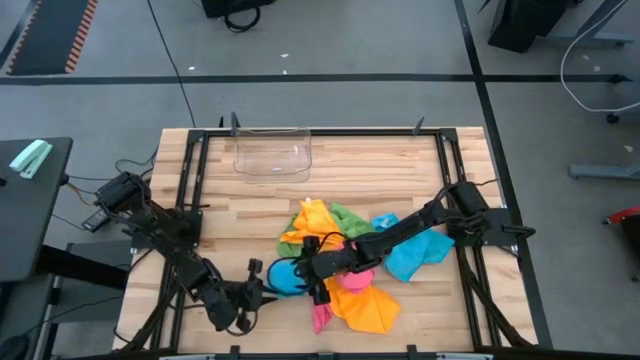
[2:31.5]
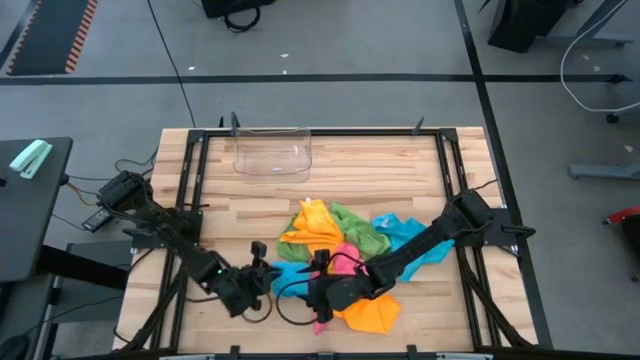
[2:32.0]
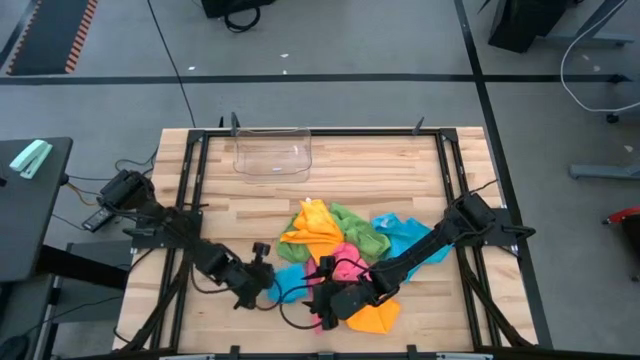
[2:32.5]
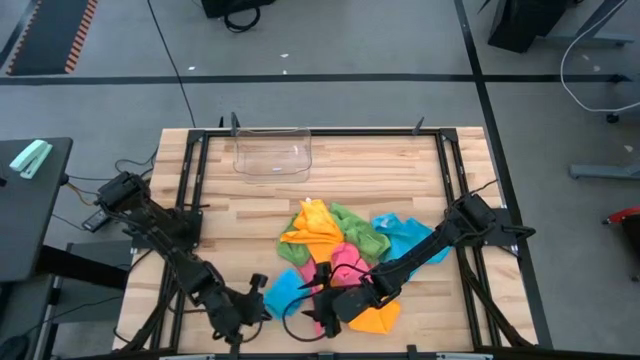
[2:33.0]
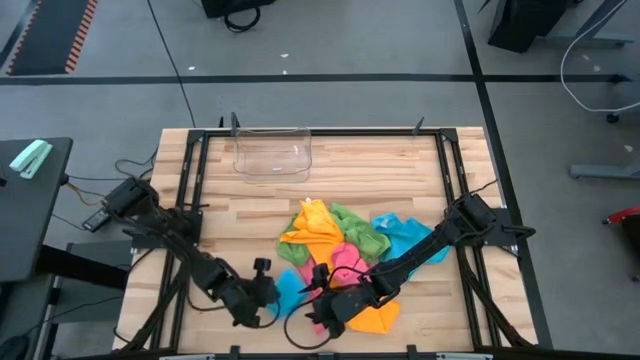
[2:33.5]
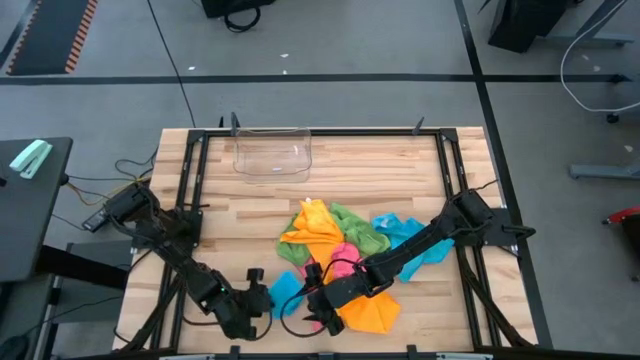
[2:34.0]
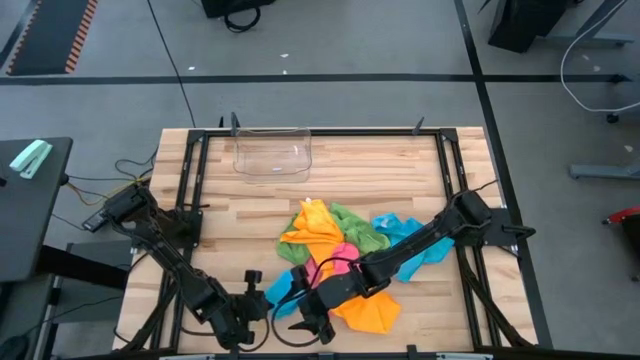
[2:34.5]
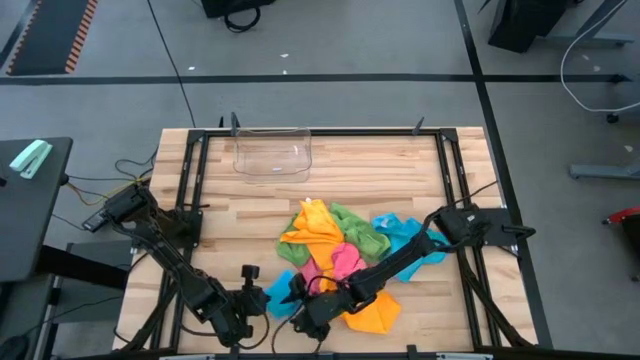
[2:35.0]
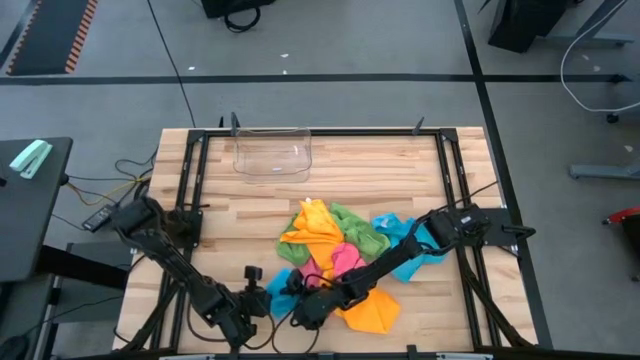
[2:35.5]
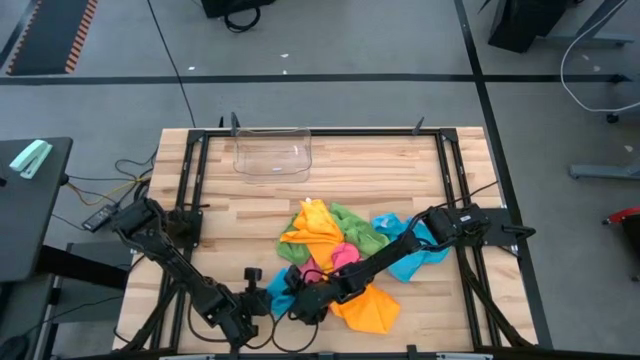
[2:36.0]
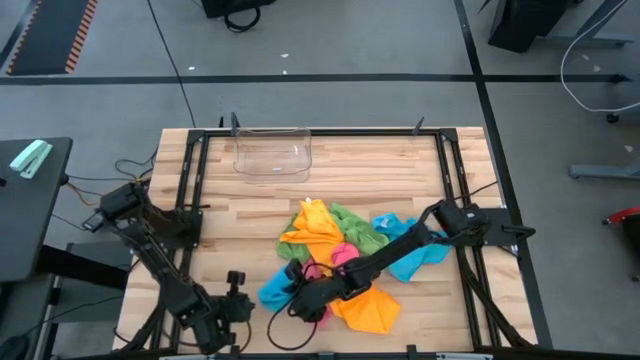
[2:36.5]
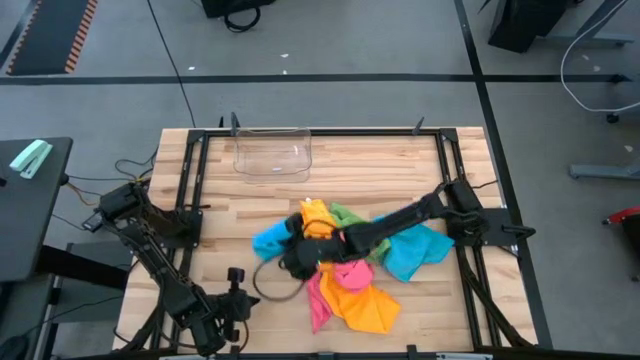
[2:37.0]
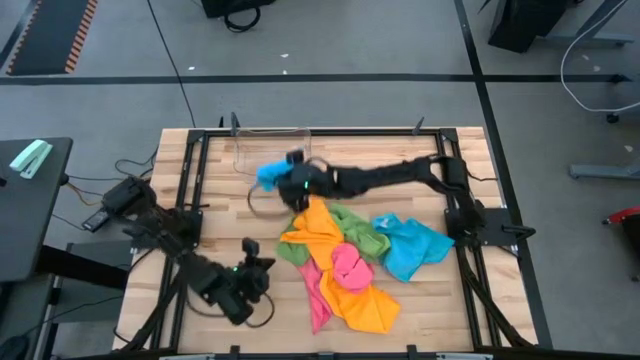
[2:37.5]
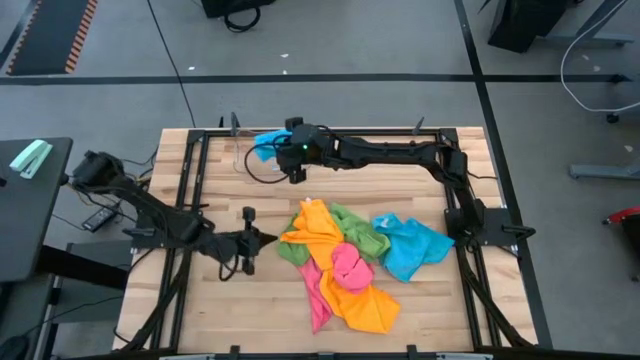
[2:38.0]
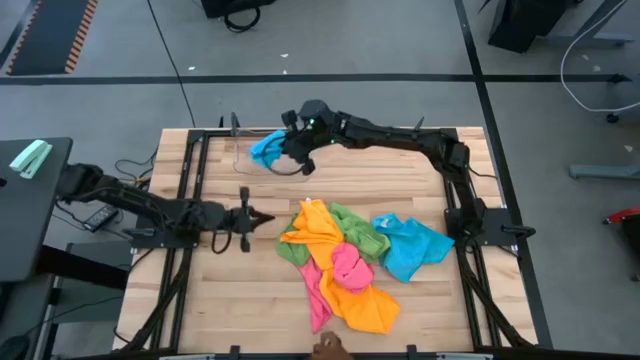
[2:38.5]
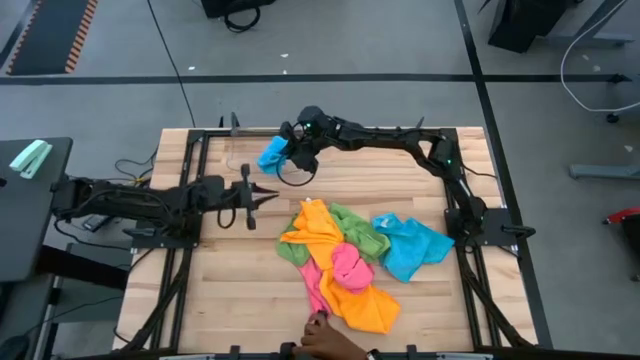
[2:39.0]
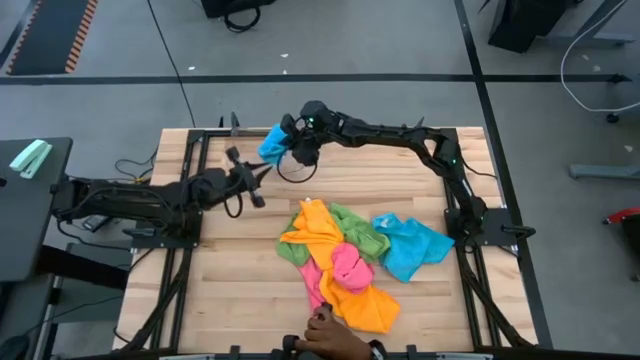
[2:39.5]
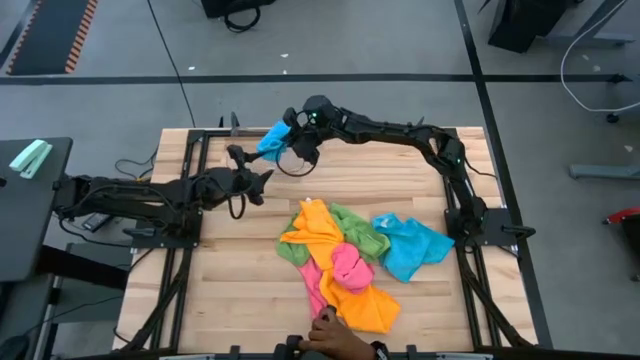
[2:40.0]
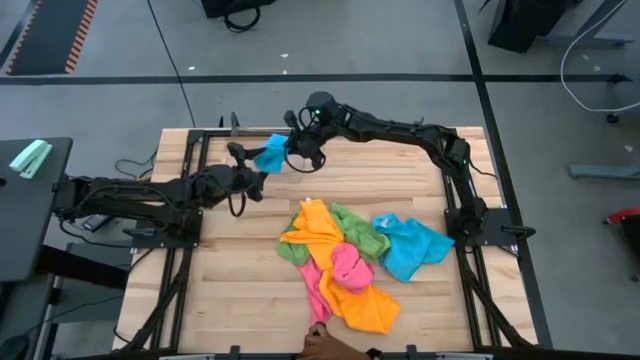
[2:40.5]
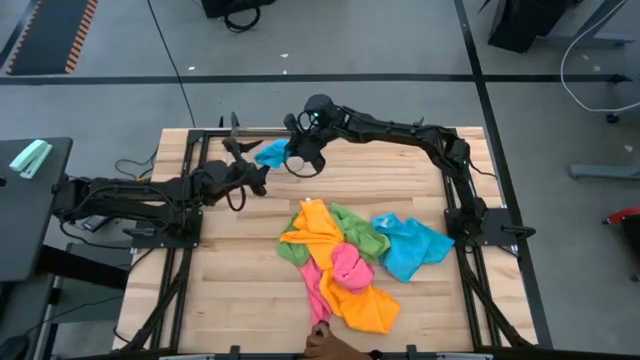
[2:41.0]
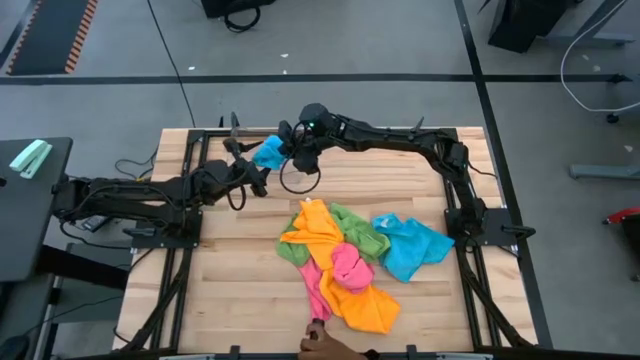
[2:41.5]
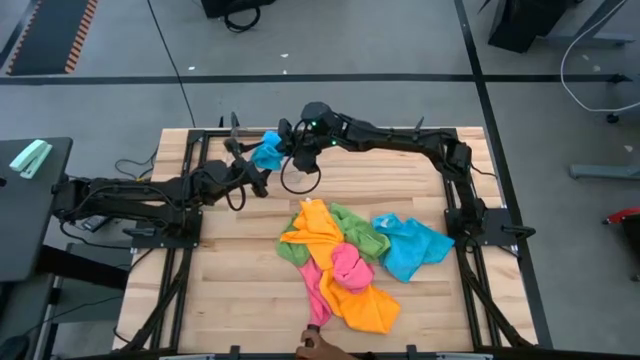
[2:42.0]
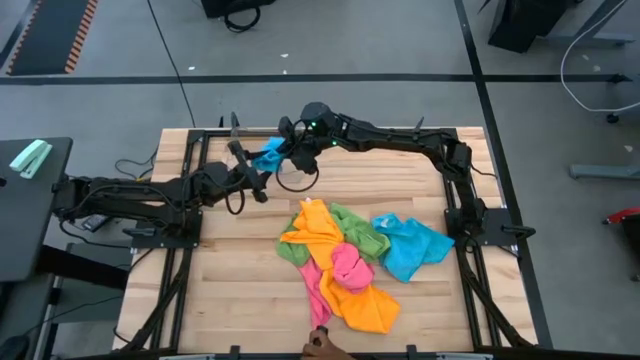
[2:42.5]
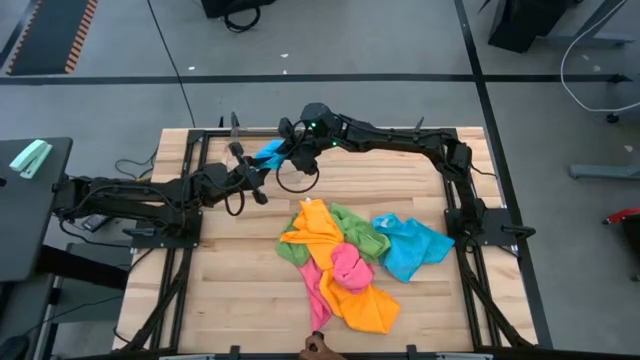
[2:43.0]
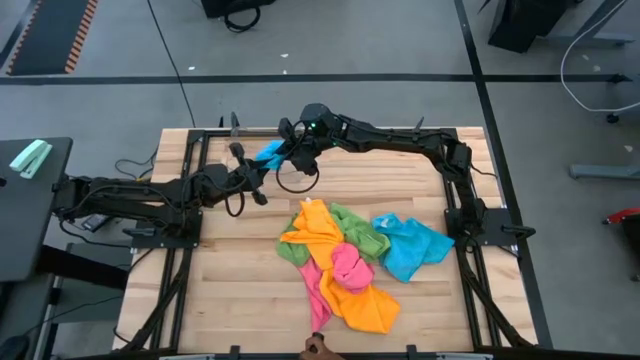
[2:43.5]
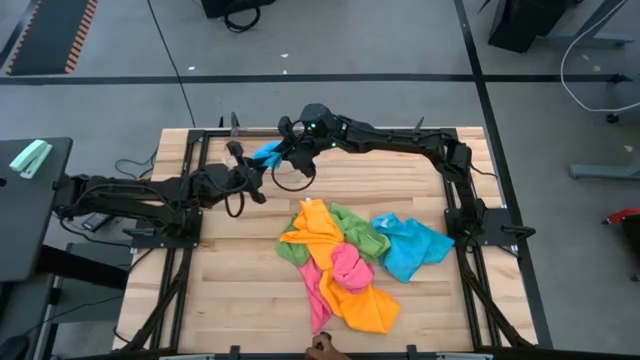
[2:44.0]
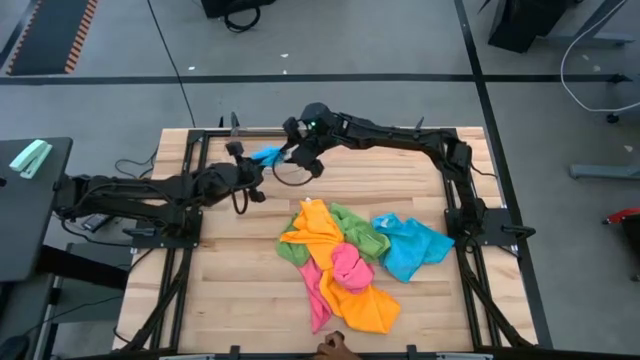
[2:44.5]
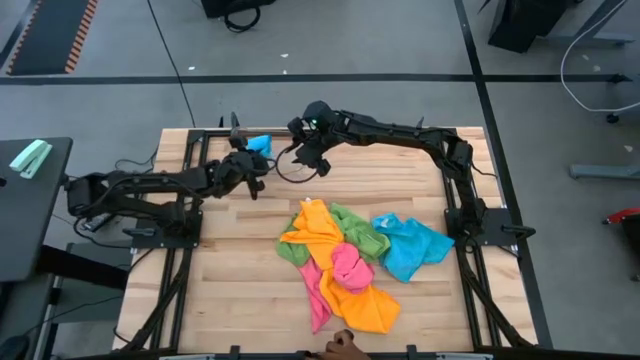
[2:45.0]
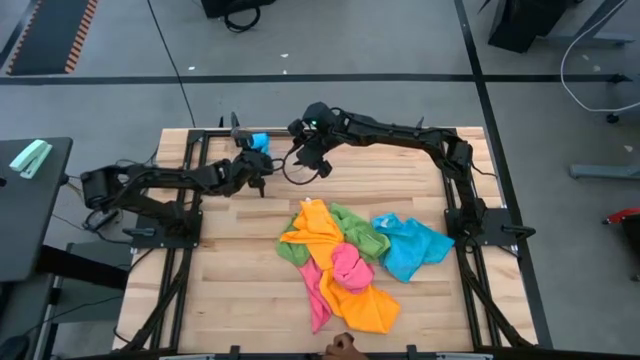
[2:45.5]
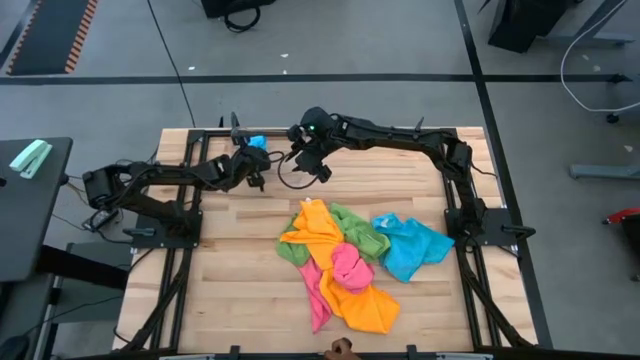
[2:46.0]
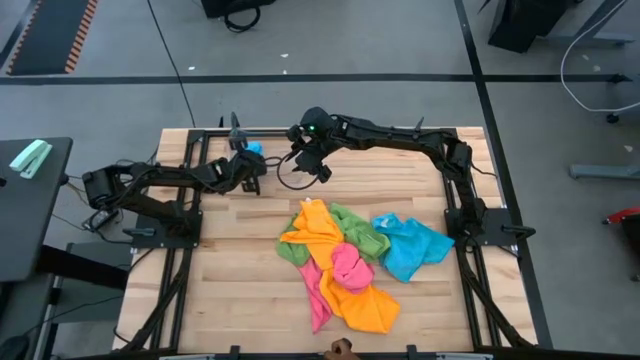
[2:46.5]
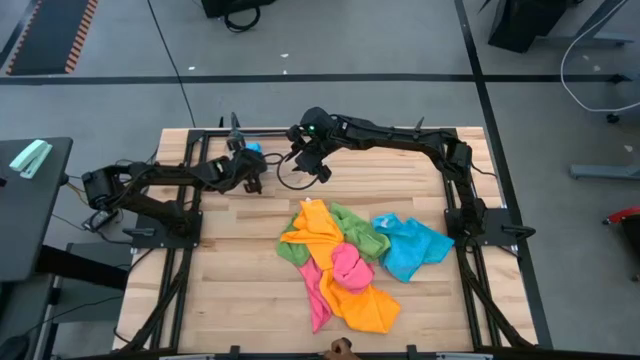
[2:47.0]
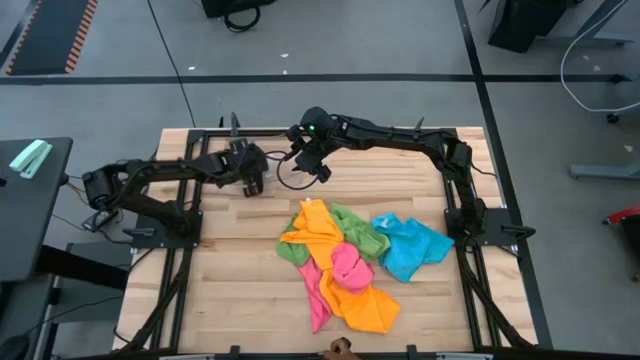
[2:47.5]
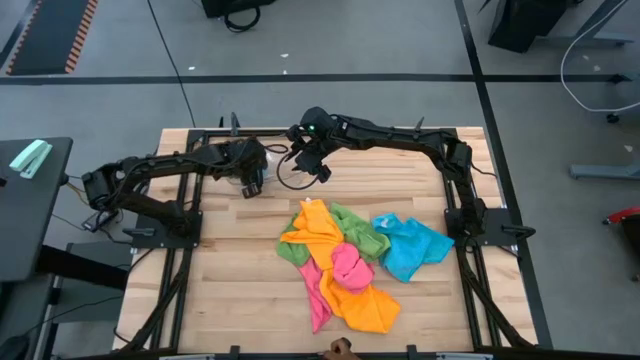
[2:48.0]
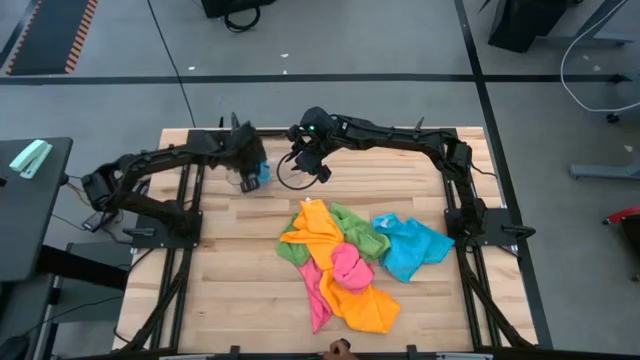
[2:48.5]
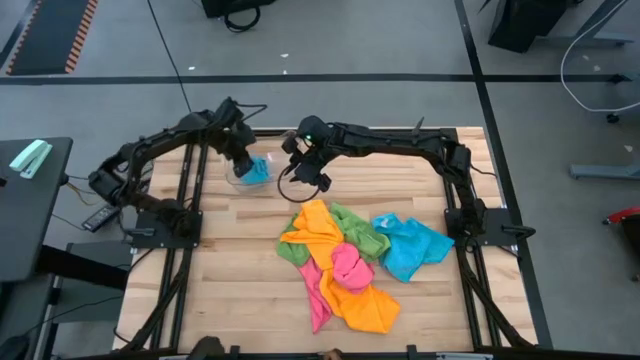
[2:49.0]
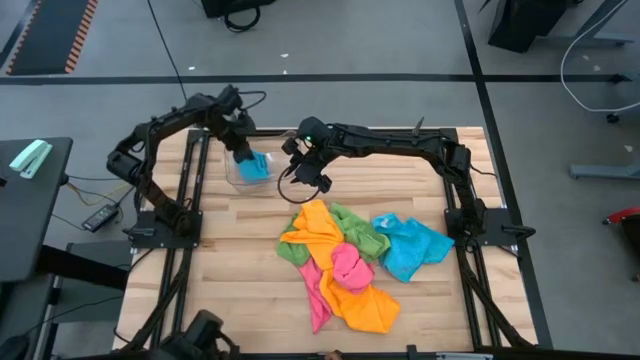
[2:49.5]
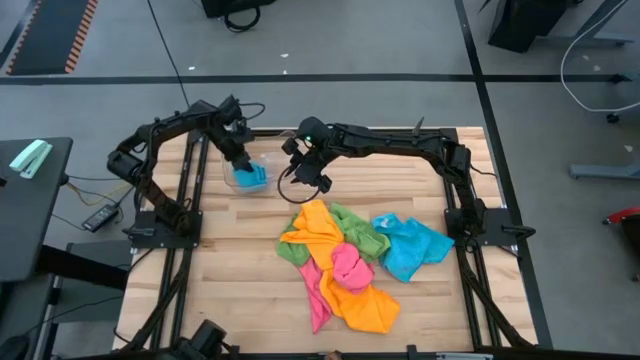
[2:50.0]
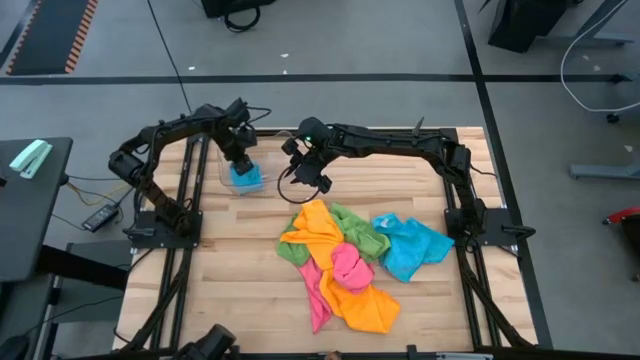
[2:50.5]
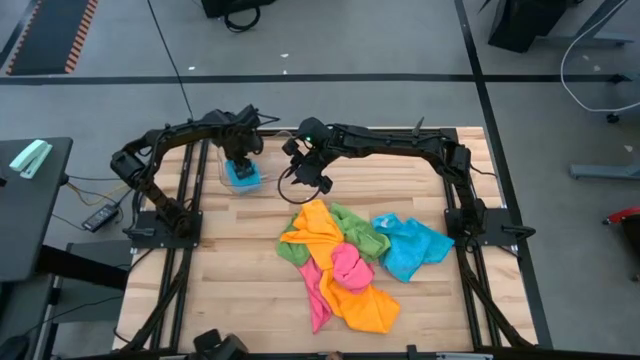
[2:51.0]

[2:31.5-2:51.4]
Task: Fold microfiber towels
Put the left blue microfiber towel into the transparent bin

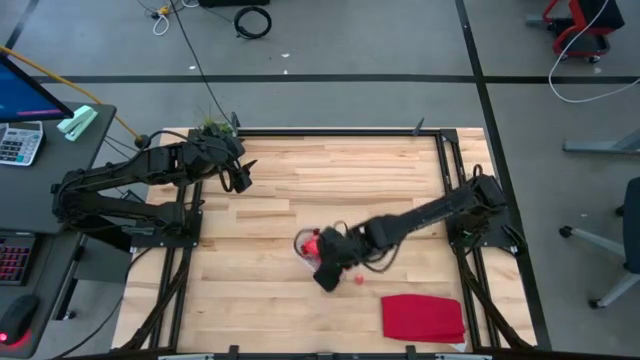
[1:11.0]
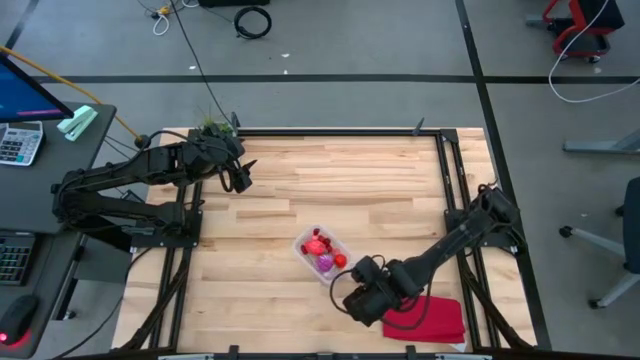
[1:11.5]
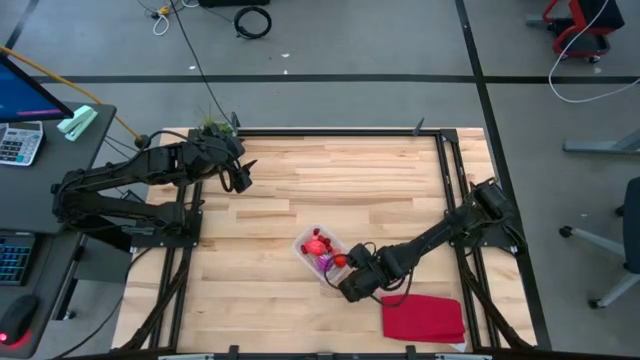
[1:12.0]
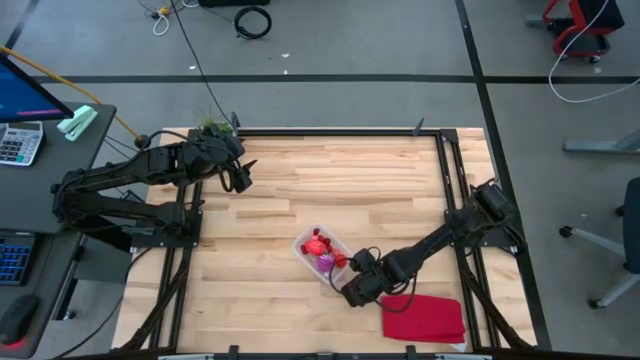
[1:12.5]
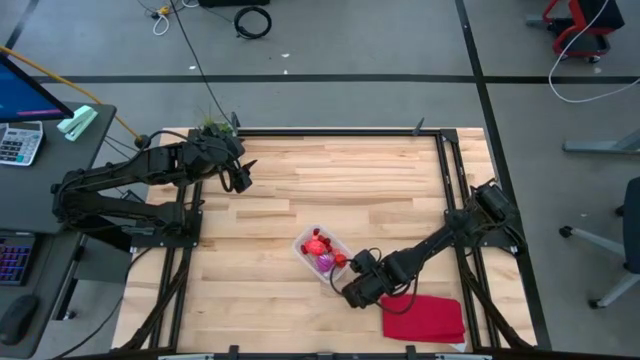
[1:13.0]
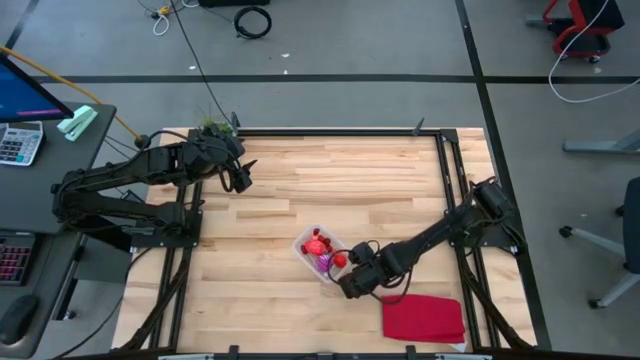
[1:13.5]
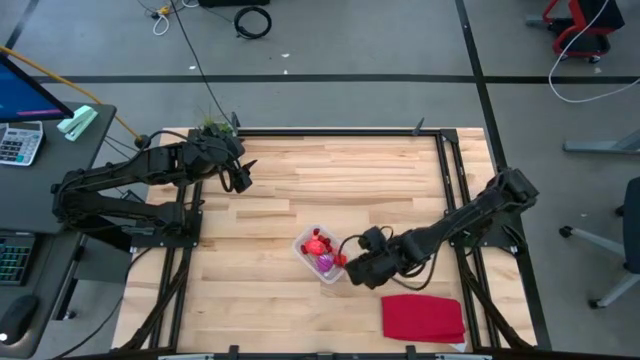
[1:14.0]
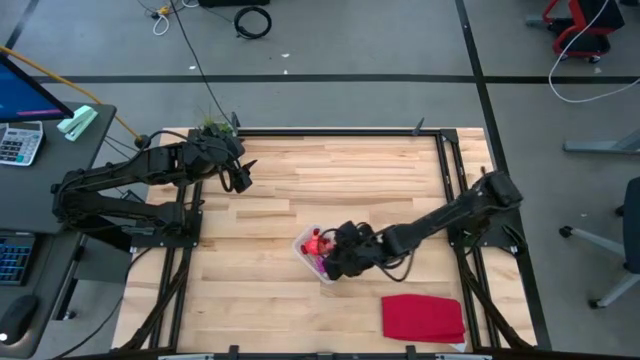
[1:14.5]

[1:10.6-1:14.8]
Task: Pick and placing Produce into tupperware
Put the pink peach into the transparent bin
